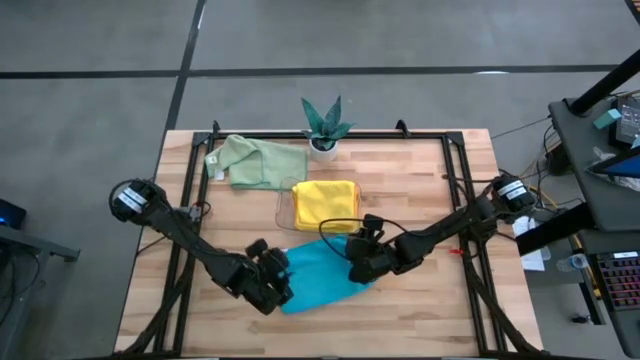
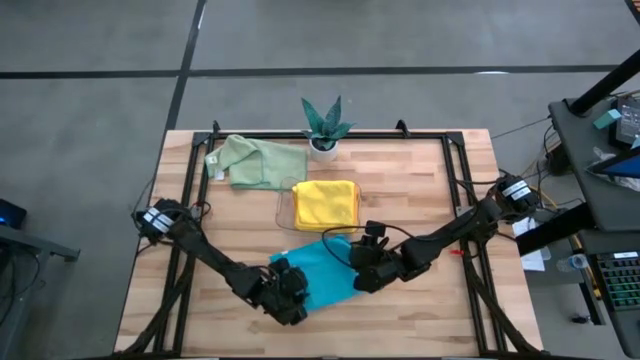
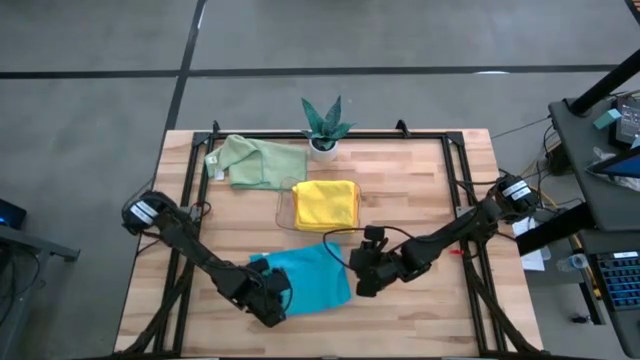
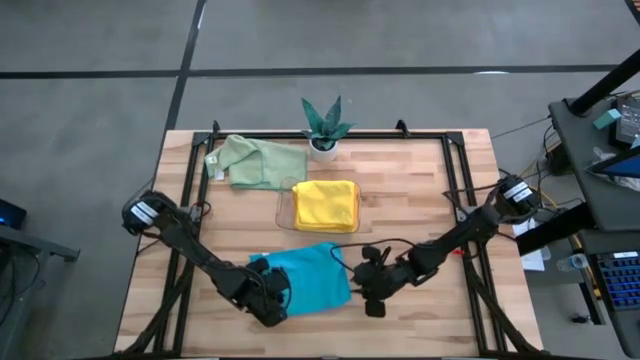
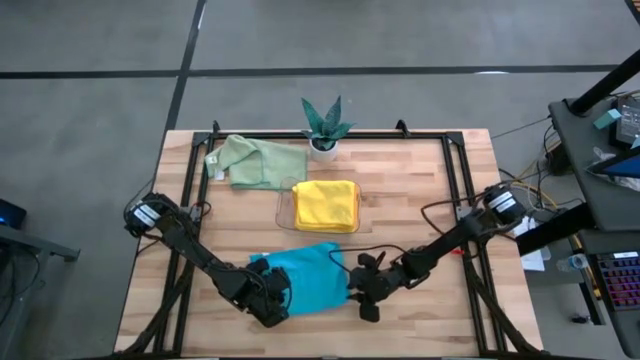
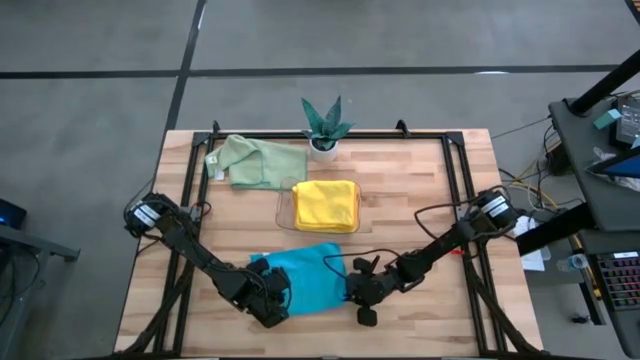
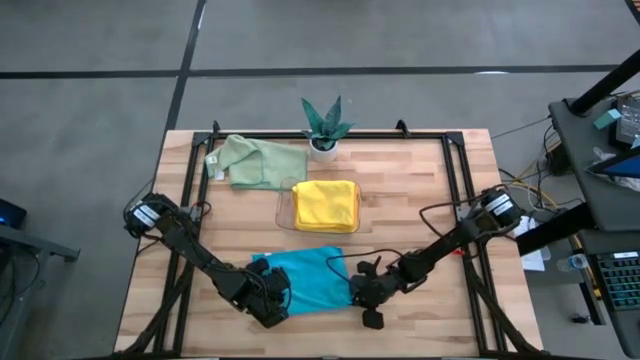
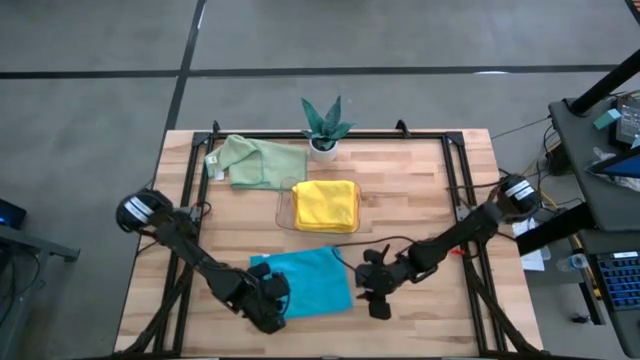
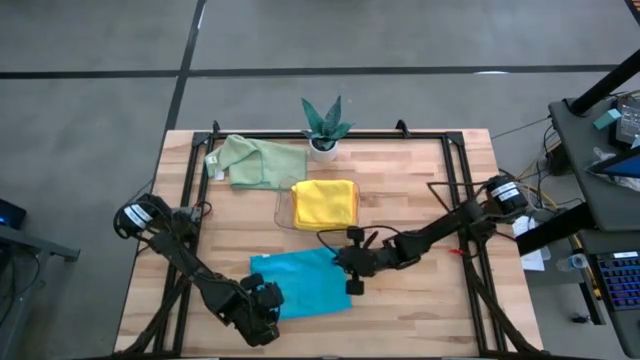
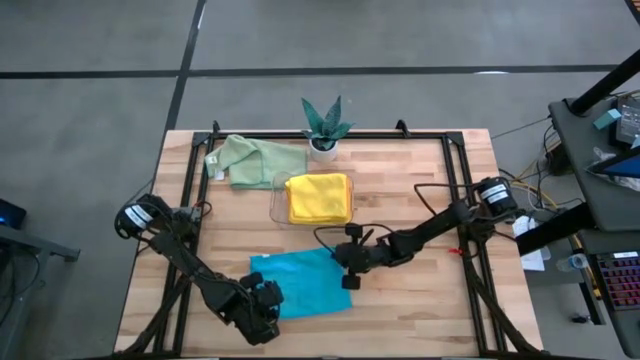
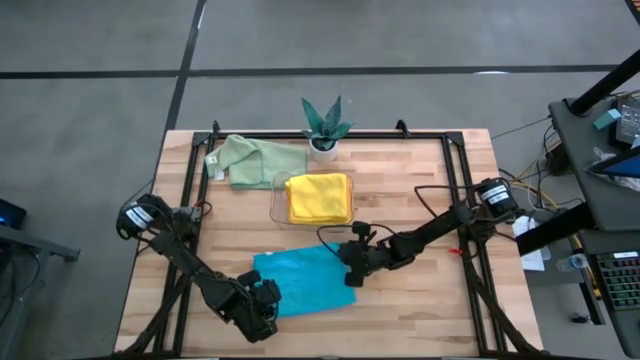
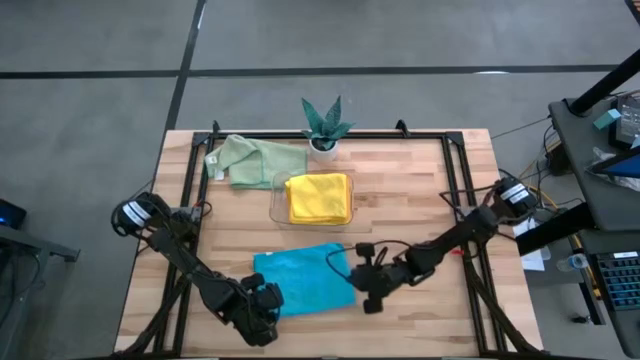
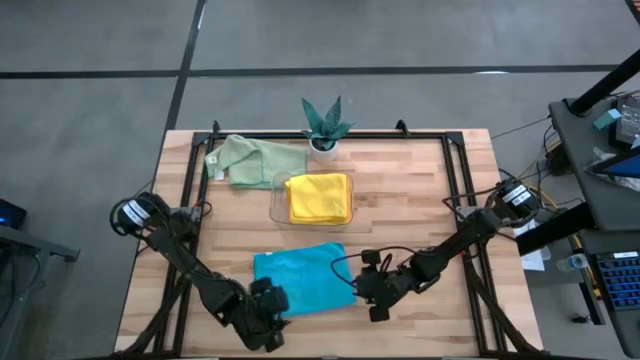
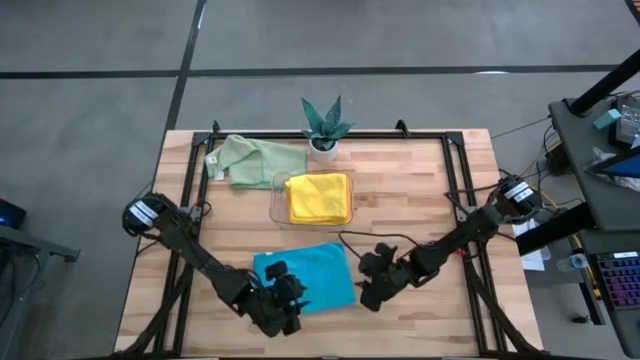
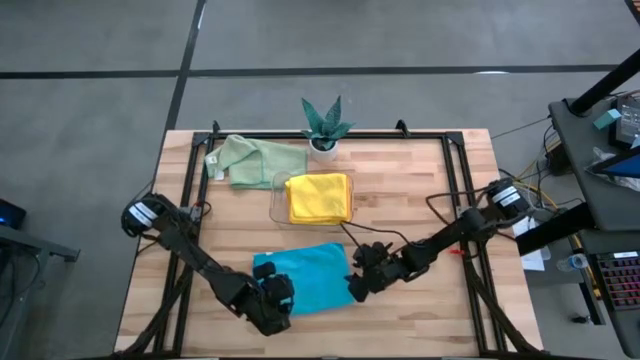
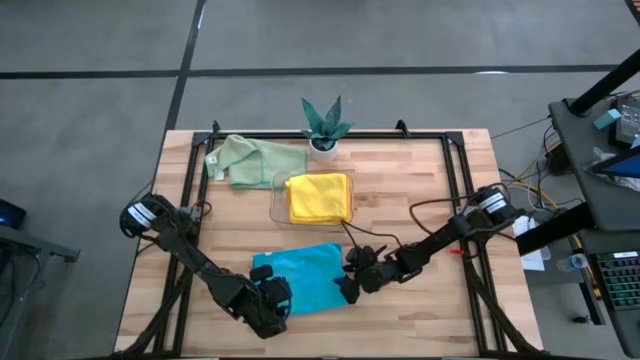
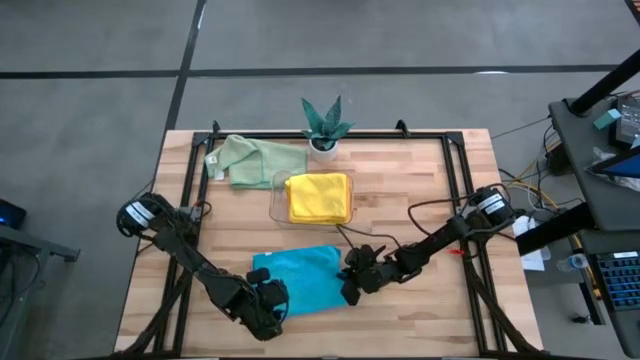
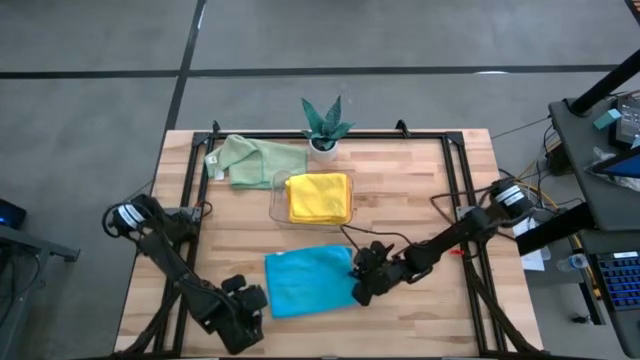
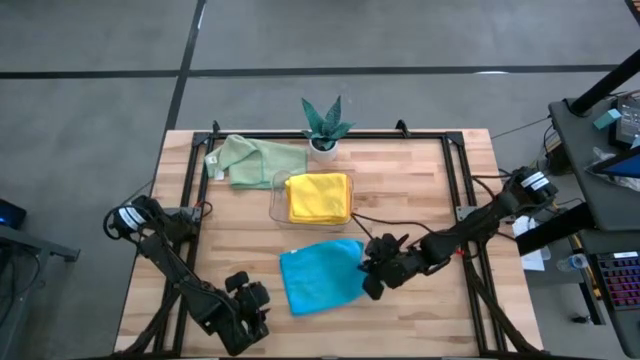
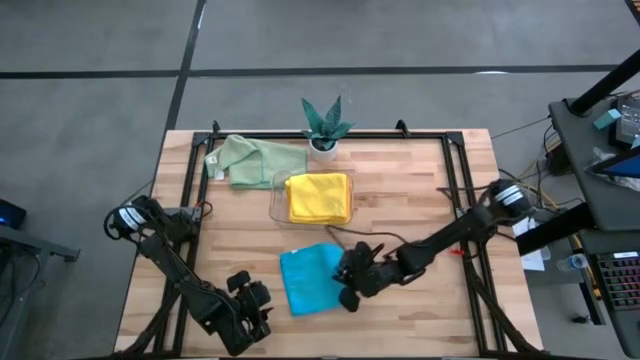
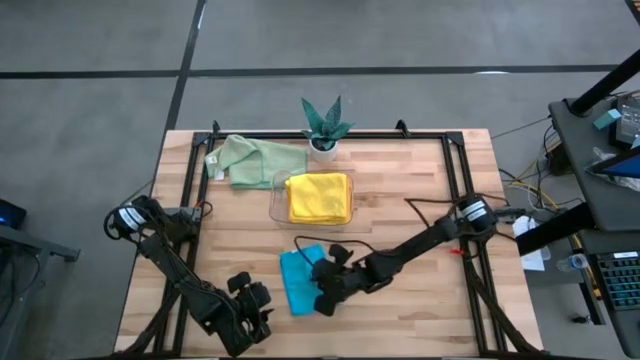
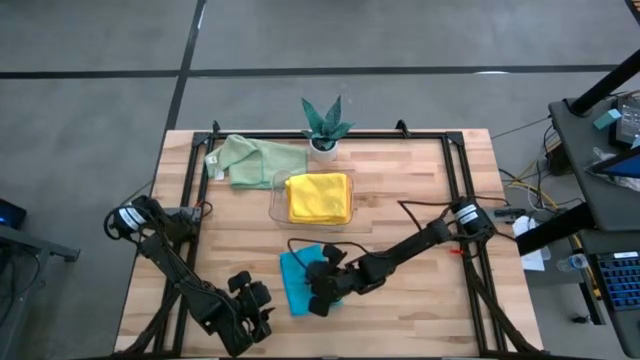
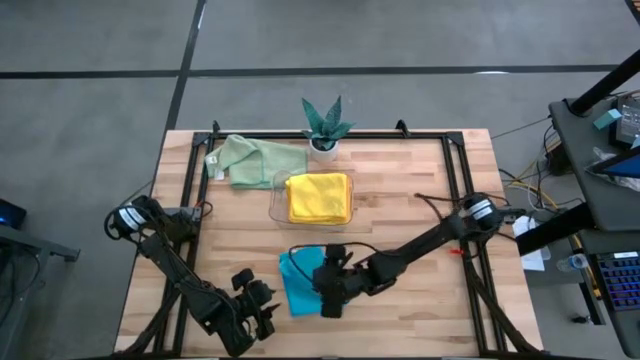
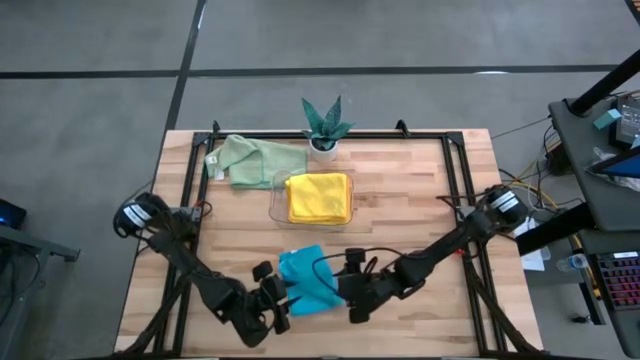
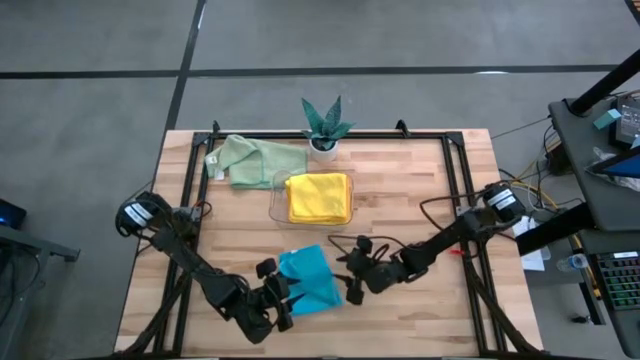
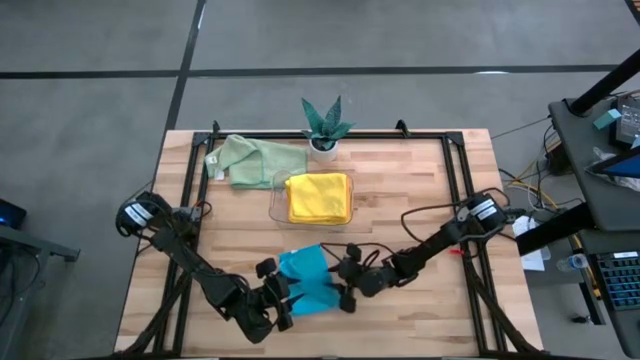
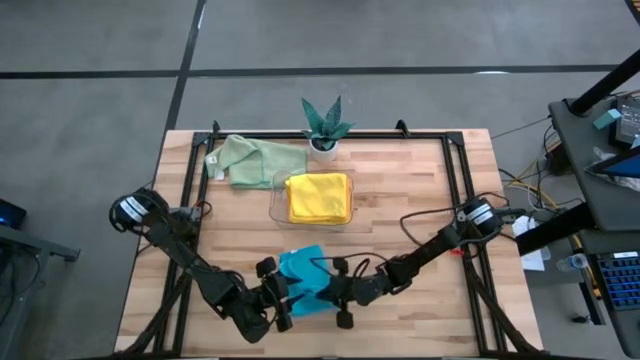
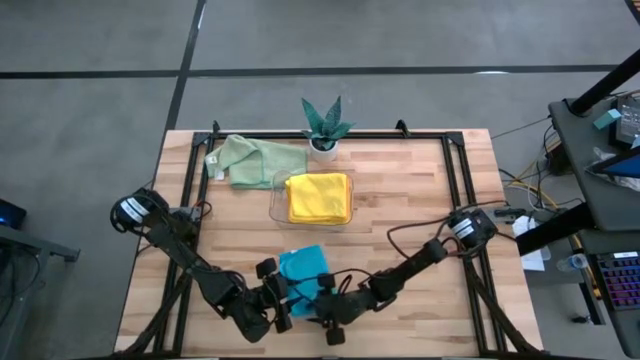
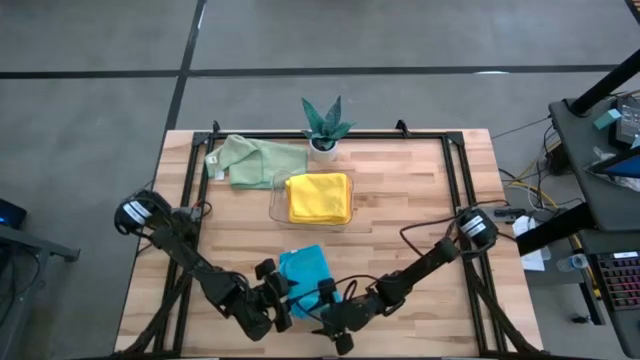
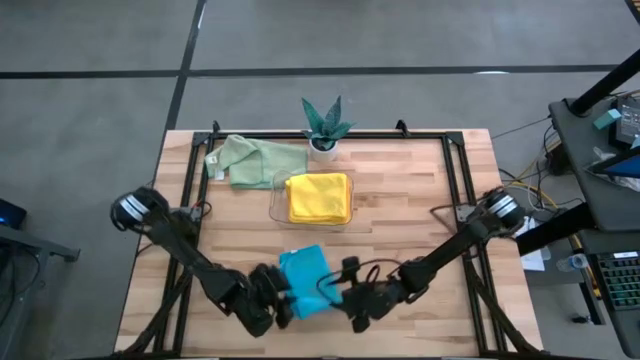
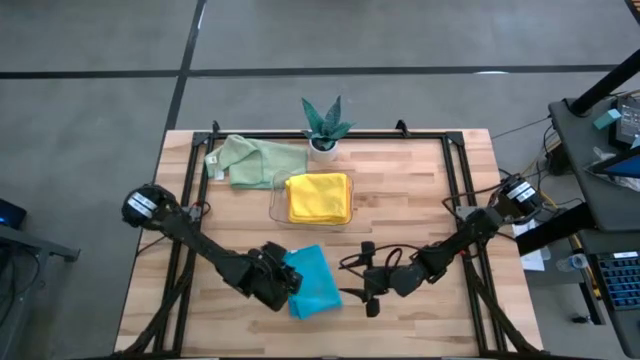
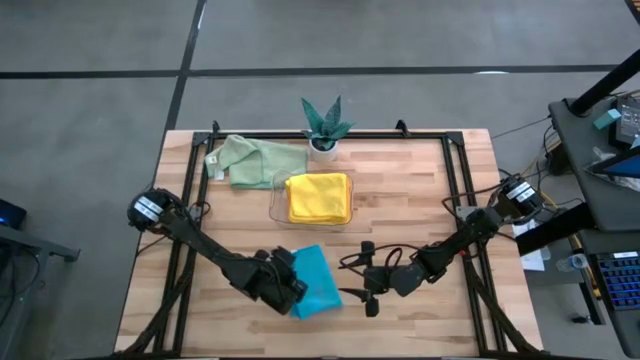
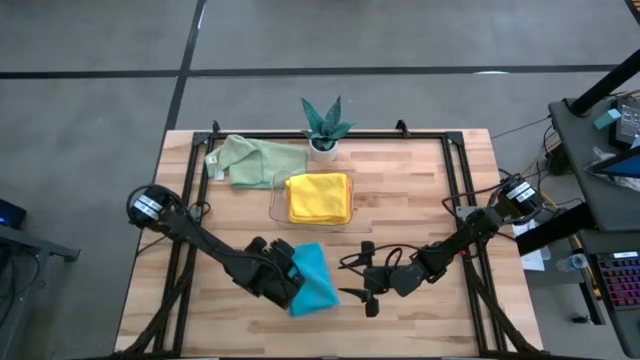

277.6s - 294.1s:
Task: Fold microfiber towels
Fold the blue microfiber towel
